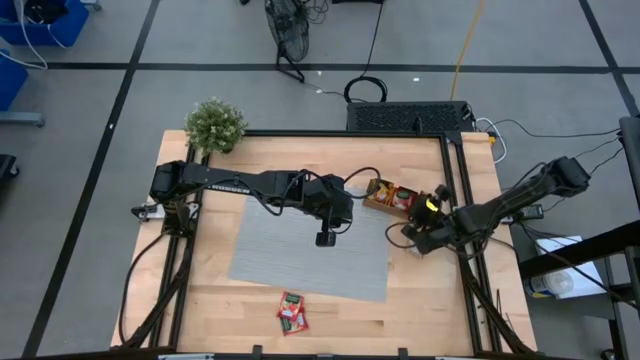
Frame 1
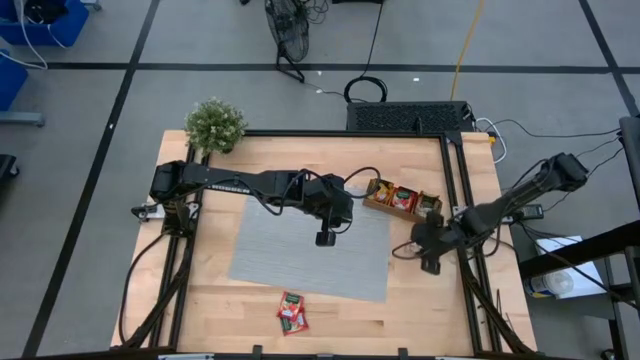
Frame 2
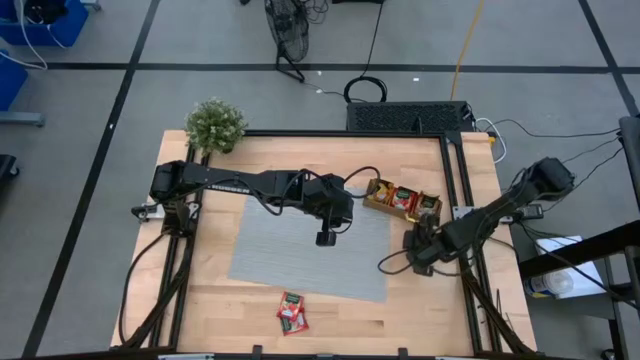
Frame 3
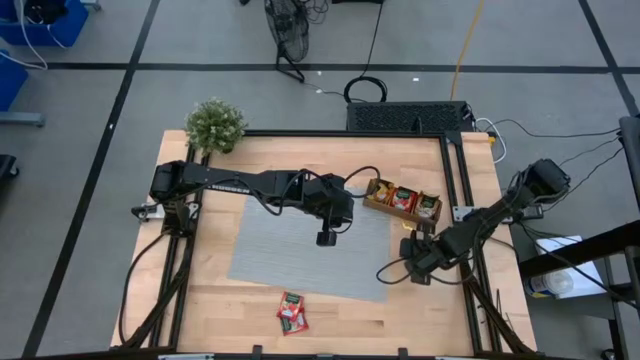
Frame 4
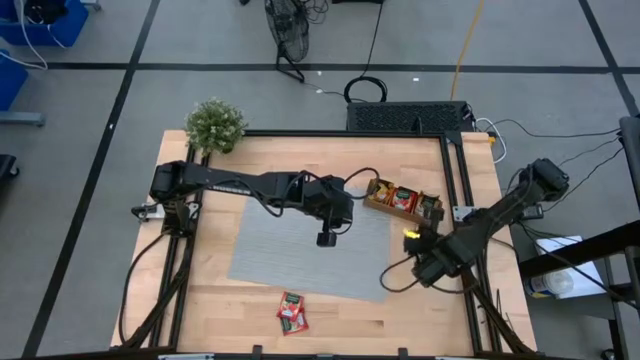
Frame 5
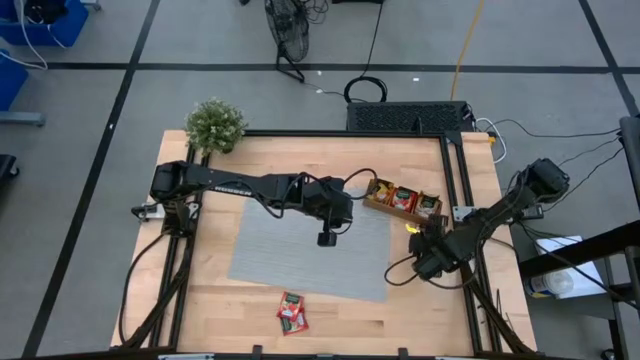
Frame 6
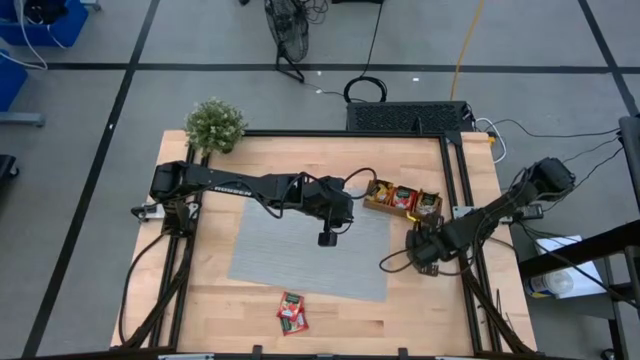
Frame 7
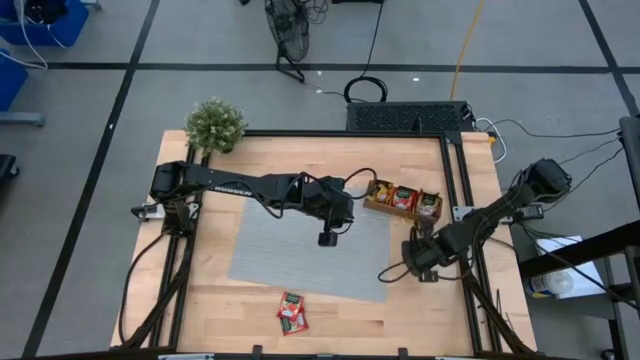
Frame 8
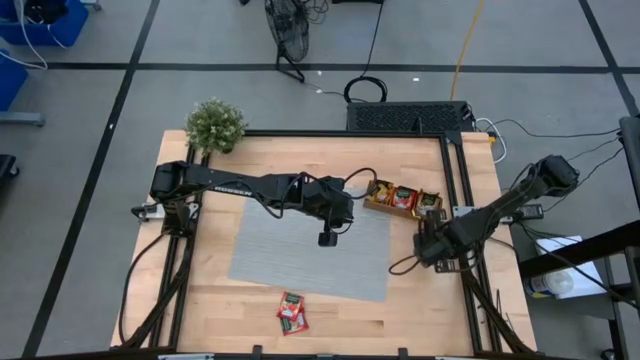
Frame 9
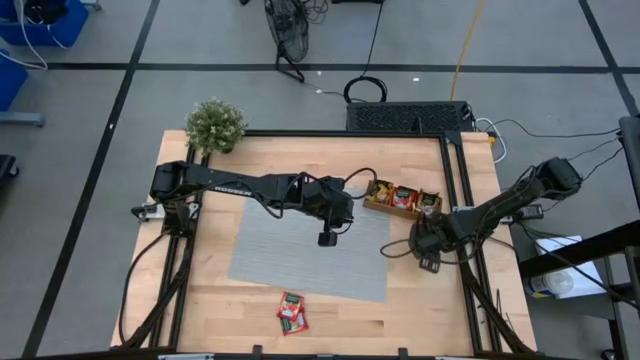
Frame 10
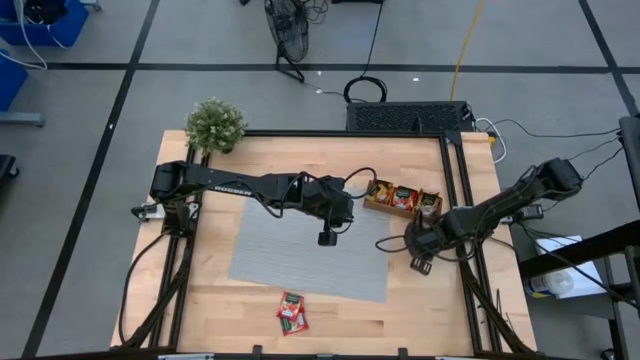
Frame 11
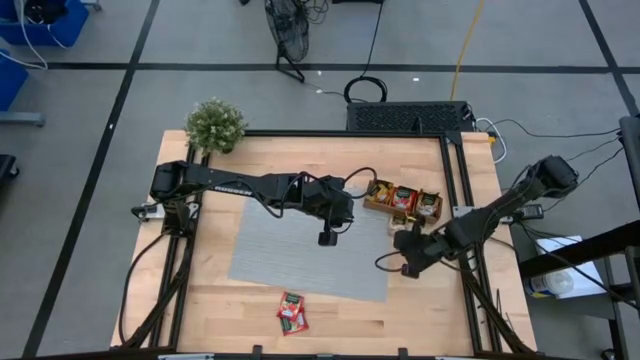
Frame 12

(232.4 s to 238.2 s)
Task: Pick & Place Tea
Put the brown tea bag into the right section of the wooden organizer

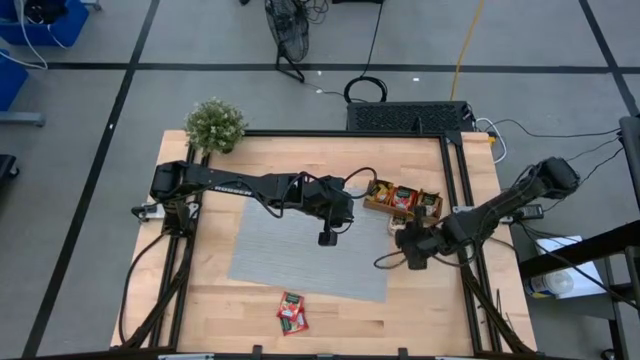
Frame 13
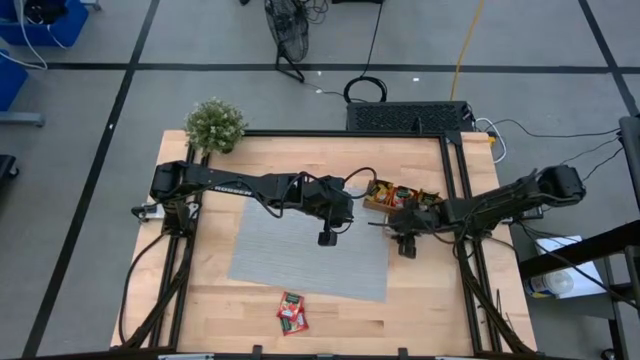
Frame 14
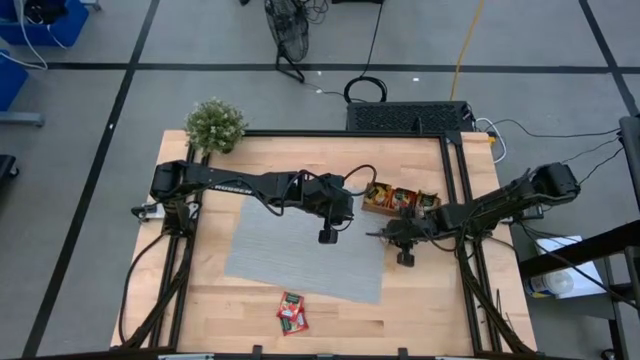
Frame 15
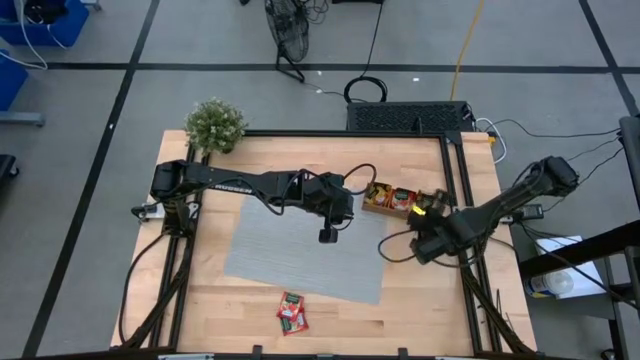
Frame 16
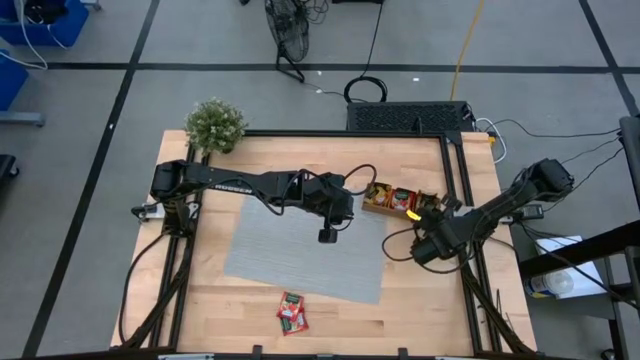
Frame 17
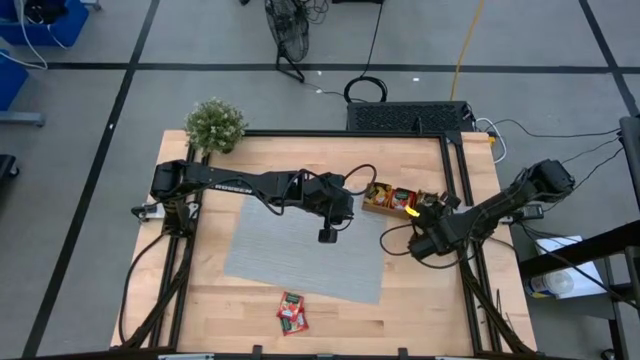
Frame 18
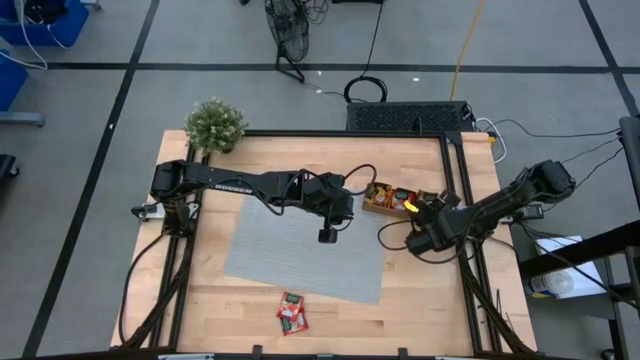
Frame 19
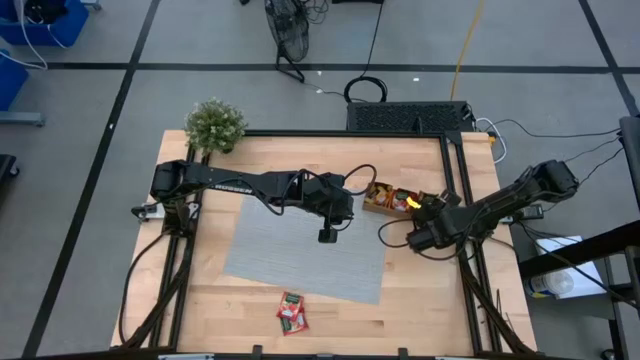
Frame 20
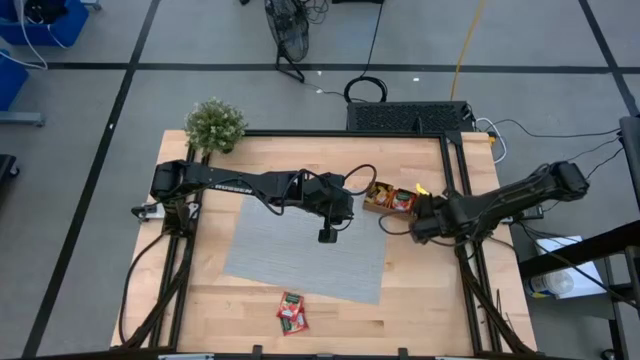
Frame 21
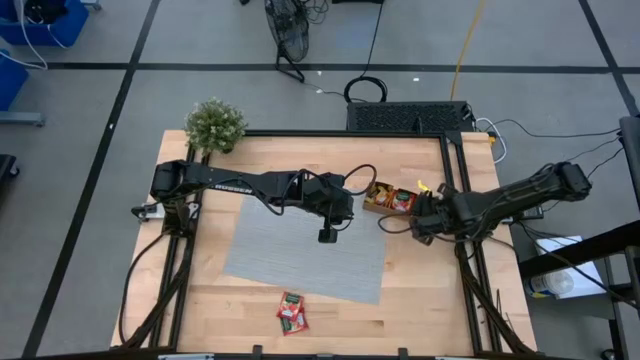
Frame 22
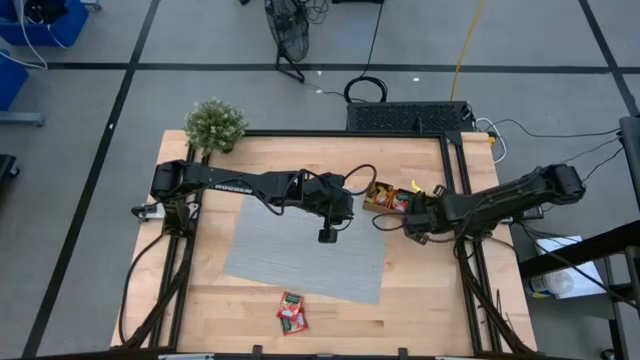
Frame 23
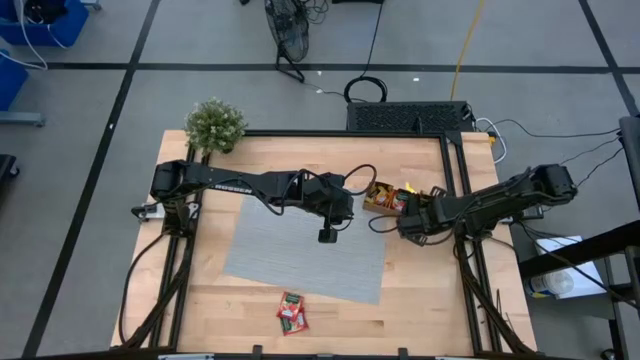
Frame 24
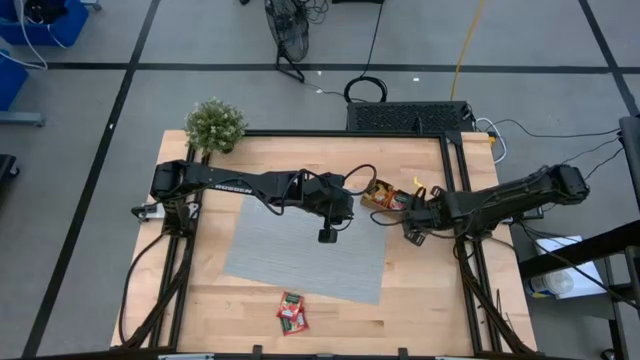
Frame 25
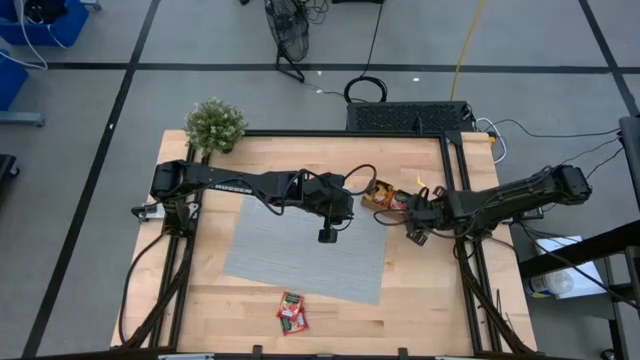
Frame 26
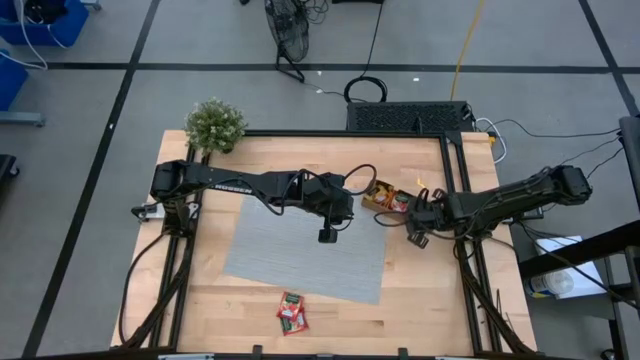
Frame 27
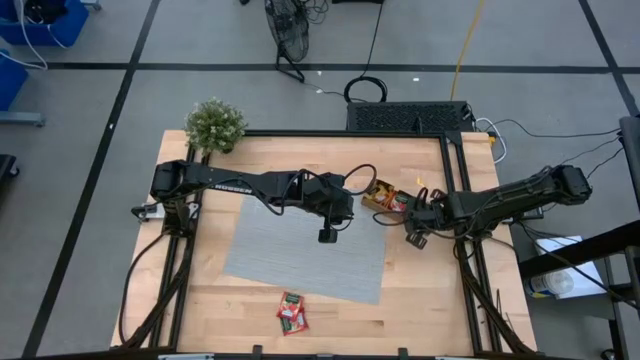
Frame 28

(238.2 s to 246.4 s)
Put the brown tea bag into the right section of the wooden organizer

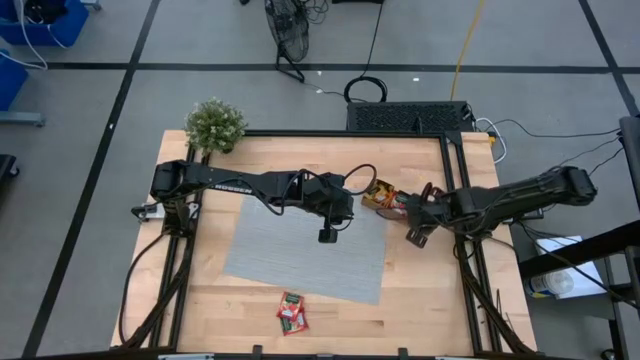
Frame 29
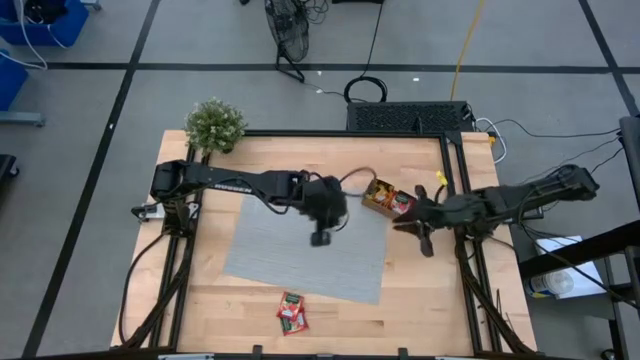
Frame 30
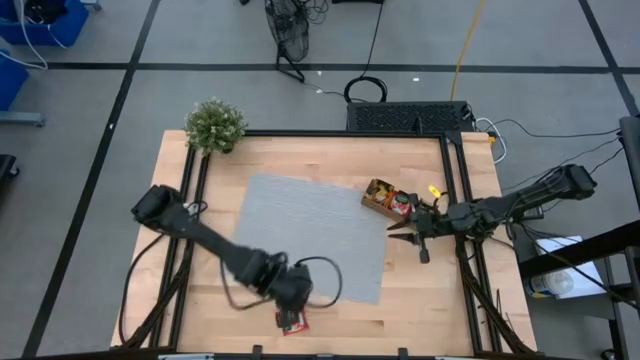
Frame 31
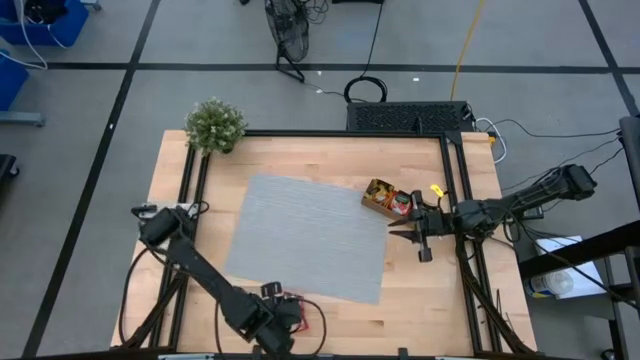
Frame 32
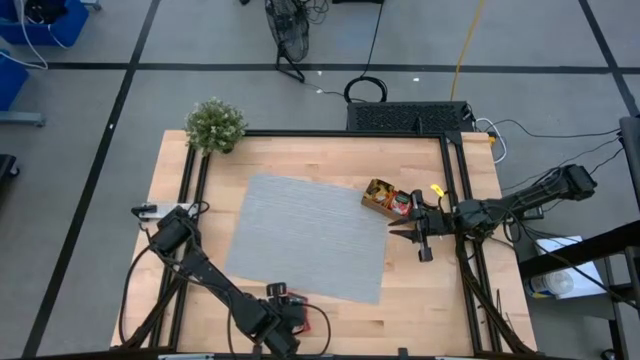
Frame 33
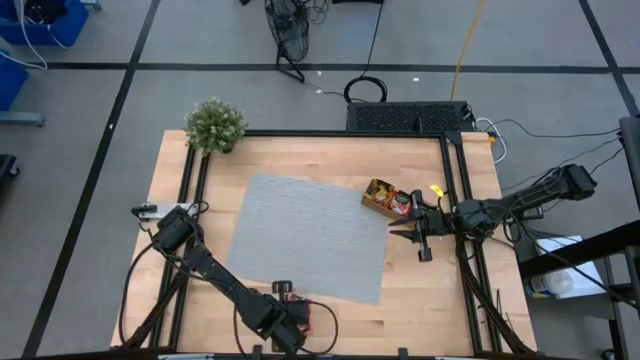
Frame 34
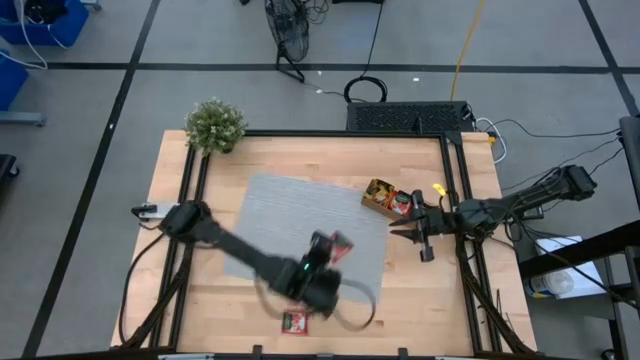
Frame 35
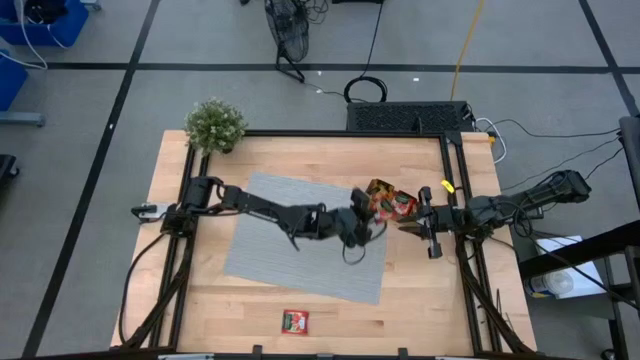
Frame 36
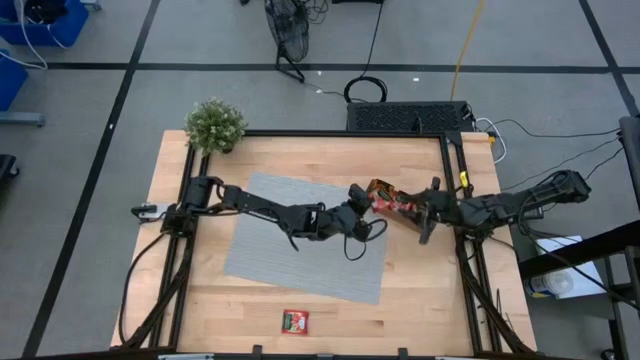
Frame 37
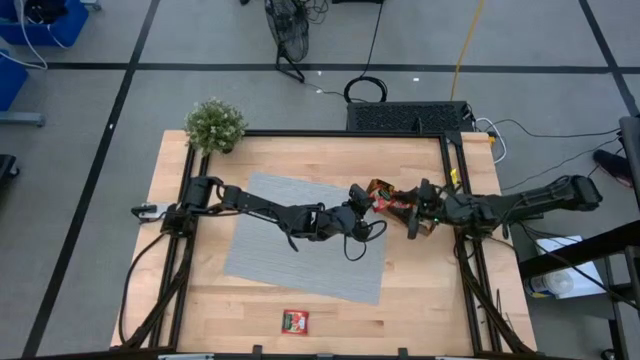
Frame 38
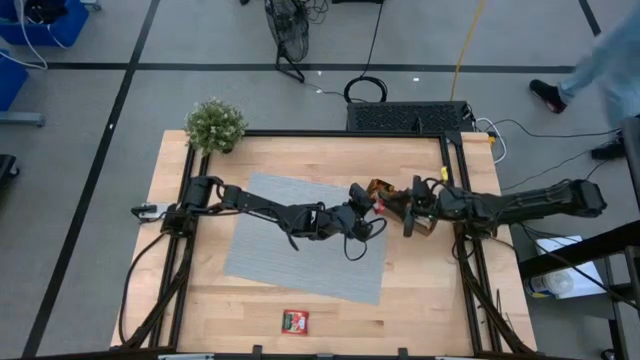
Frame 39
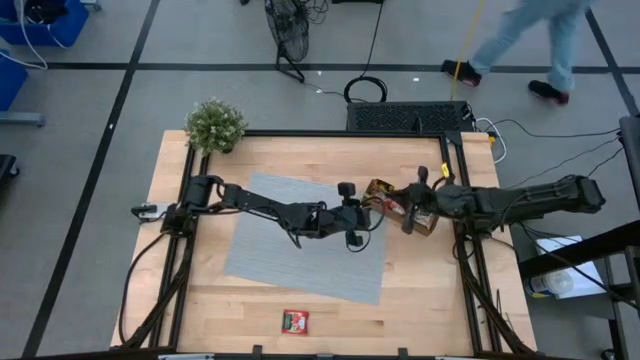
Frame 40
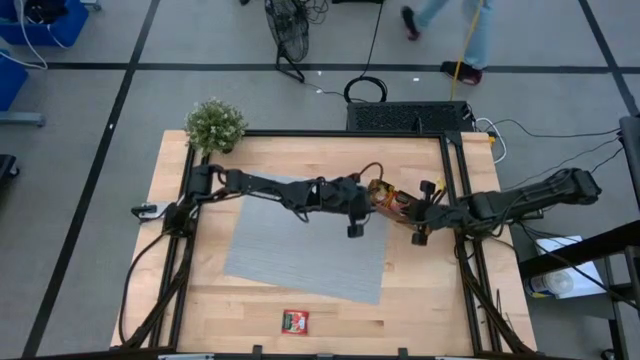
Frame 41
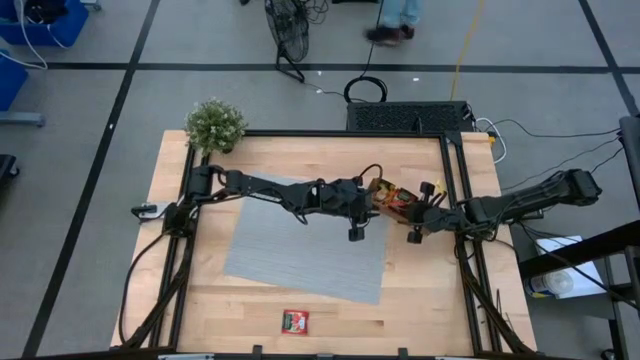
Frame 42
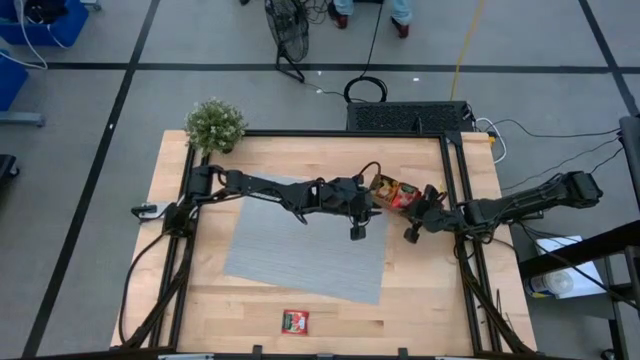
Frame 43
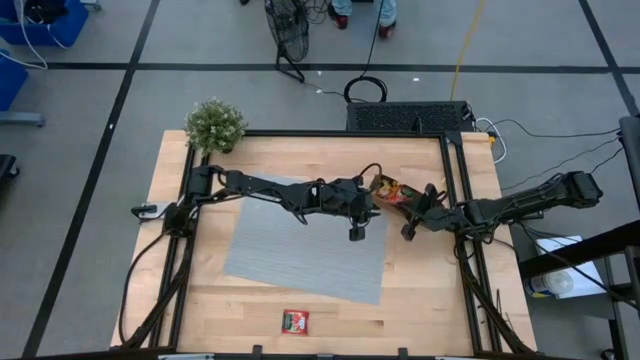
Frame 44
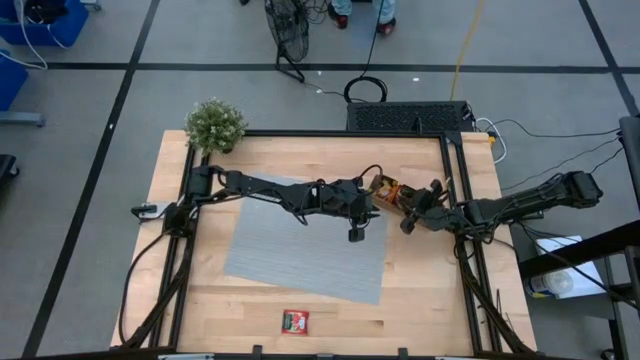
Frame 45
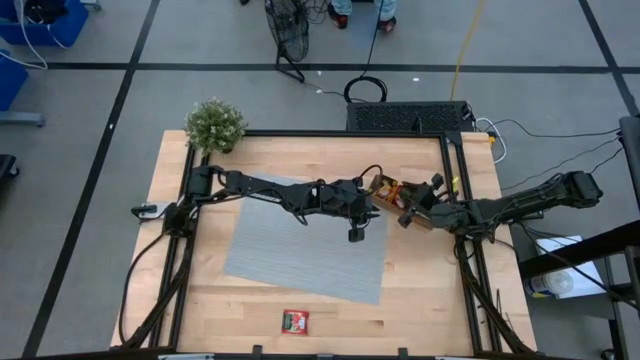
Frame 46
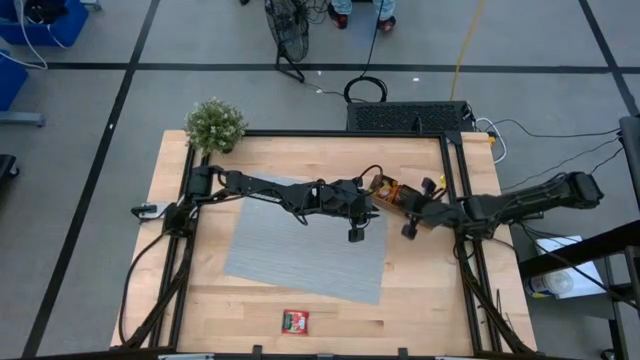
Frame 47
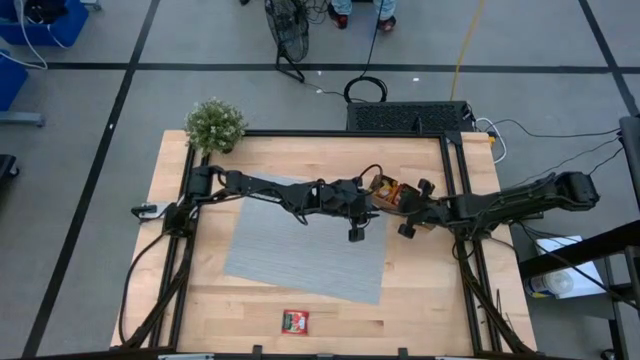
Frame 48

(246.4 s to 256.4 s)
Put the red tea bag into the middle section of the wooden organizer
